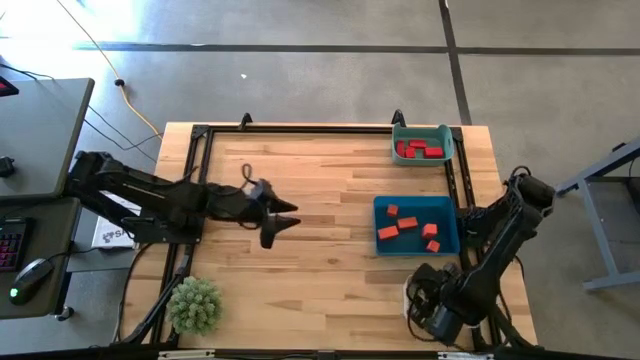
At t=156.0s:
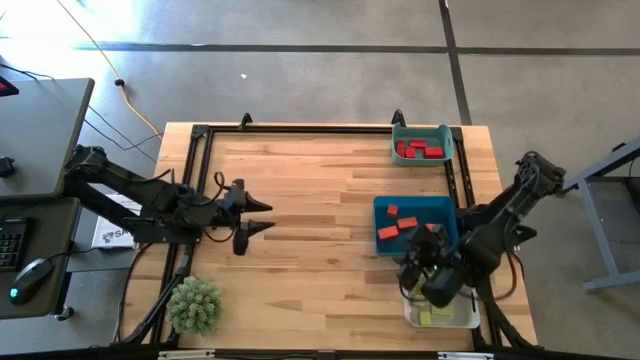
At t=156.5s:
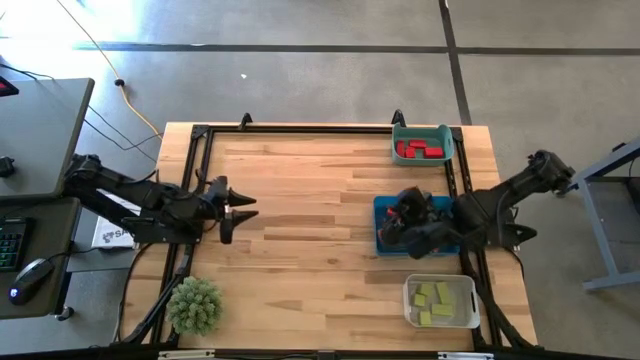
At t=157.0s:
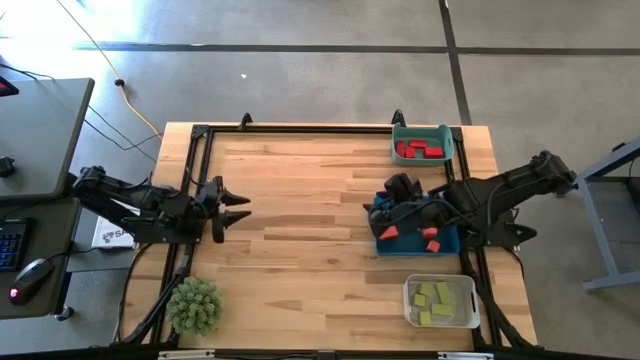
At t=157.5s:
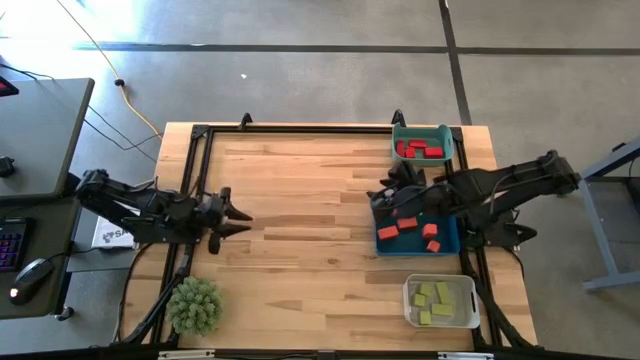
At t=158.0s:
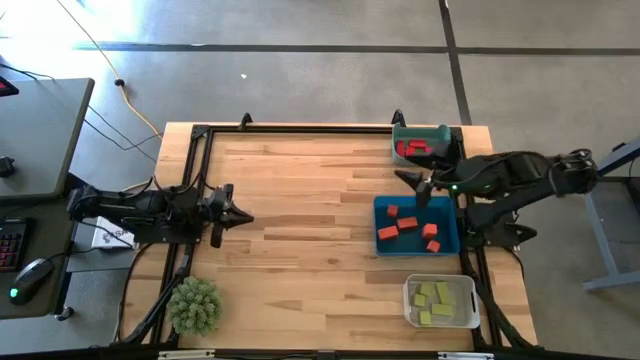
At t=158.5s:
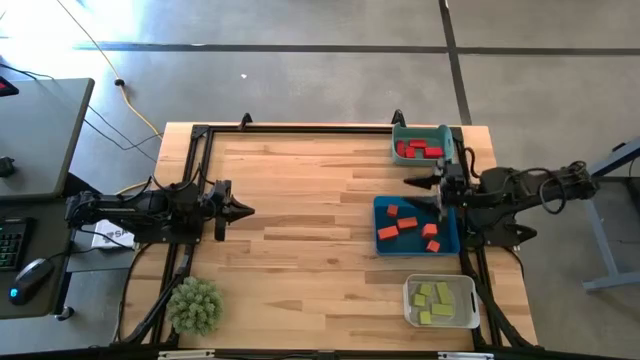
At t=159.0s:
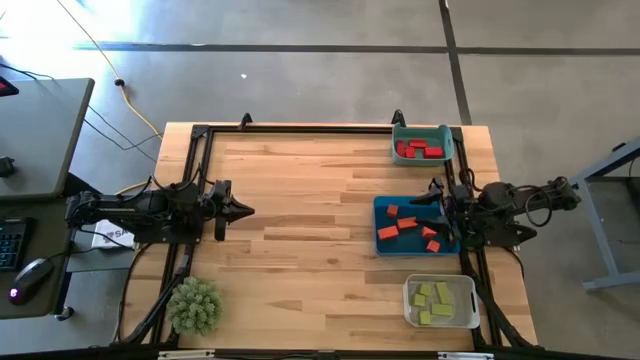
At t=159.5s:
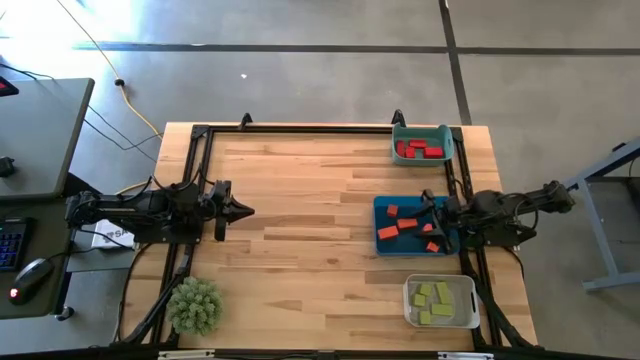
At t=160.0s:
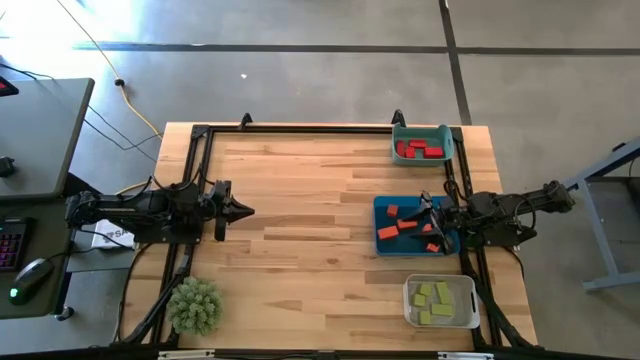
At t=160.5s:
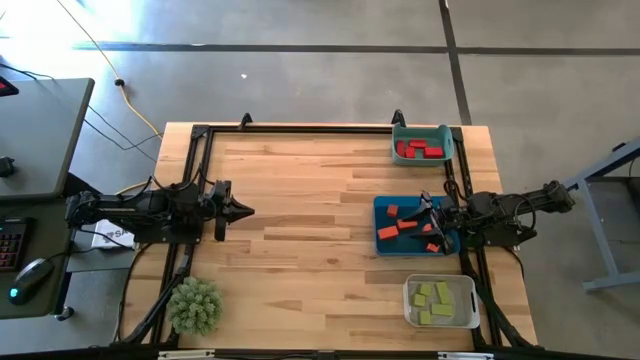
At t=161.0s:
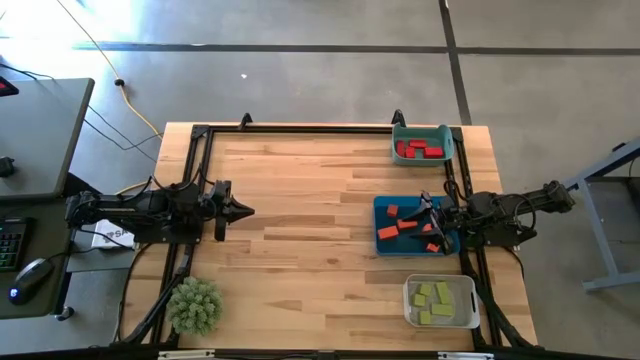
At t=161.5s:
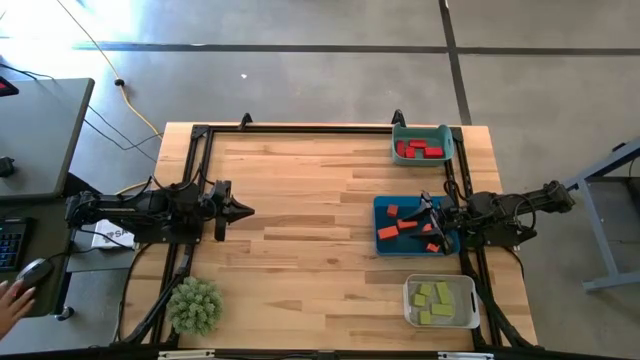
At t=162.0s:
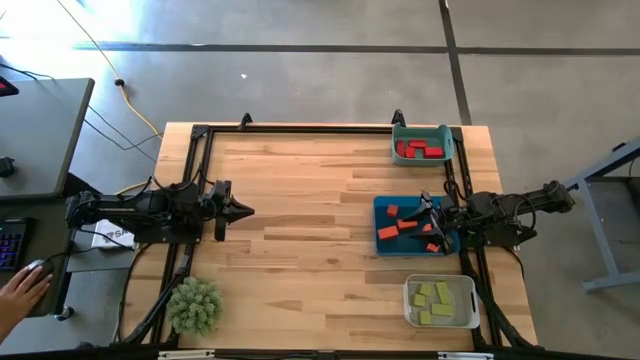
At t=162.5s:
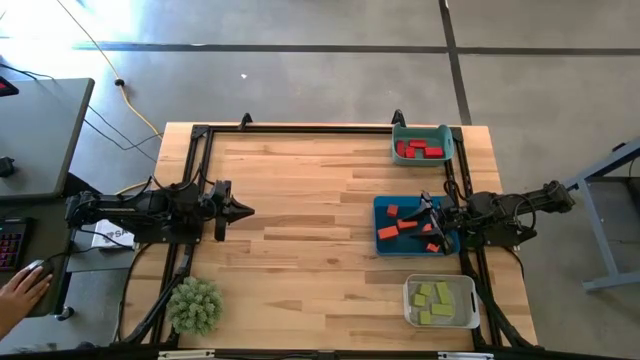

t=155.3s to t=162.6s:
Task: Sort & place blocks by color
Return to Home Position

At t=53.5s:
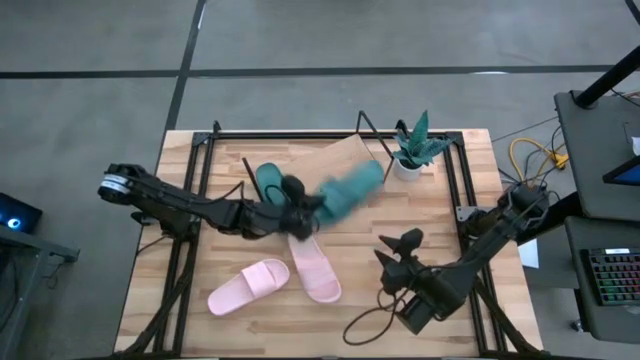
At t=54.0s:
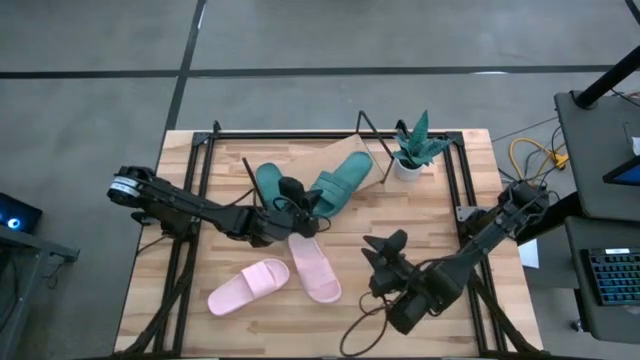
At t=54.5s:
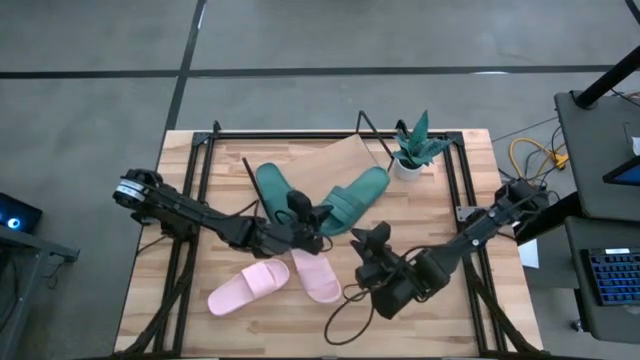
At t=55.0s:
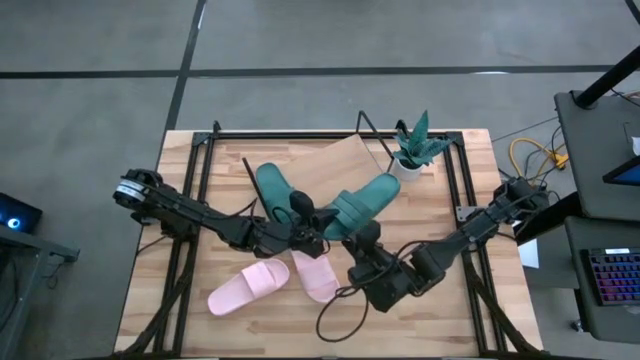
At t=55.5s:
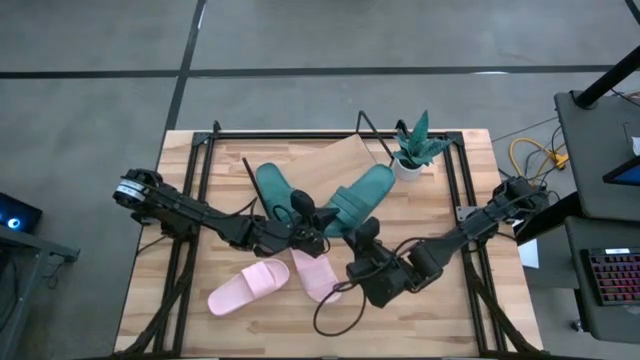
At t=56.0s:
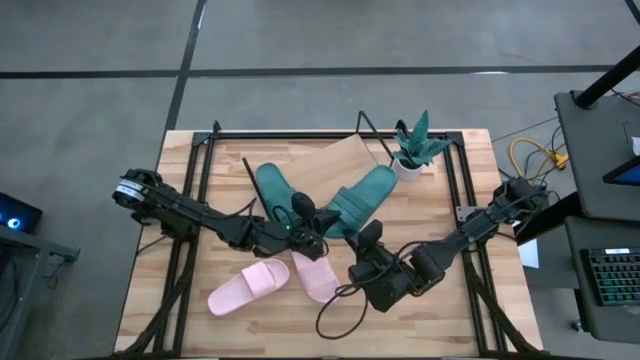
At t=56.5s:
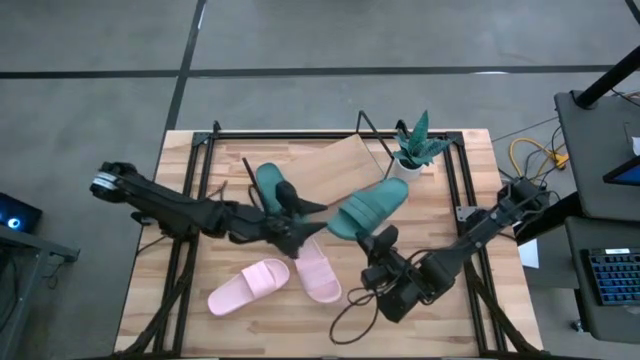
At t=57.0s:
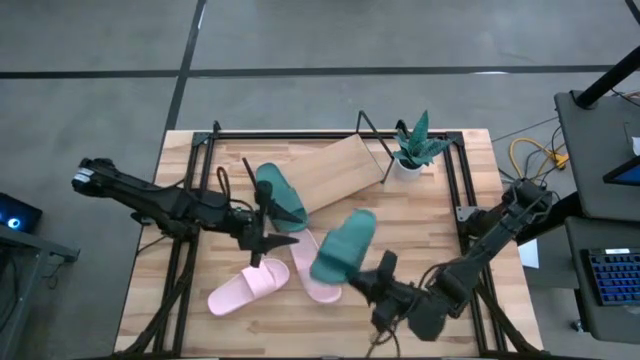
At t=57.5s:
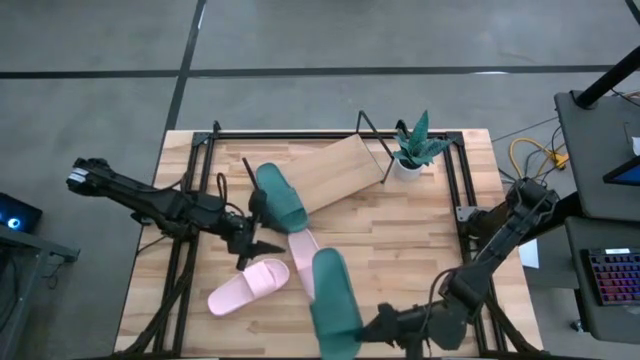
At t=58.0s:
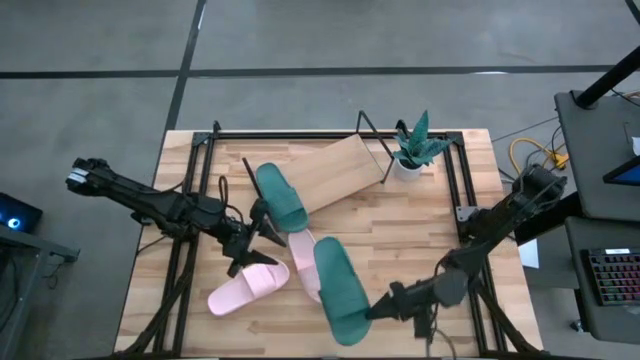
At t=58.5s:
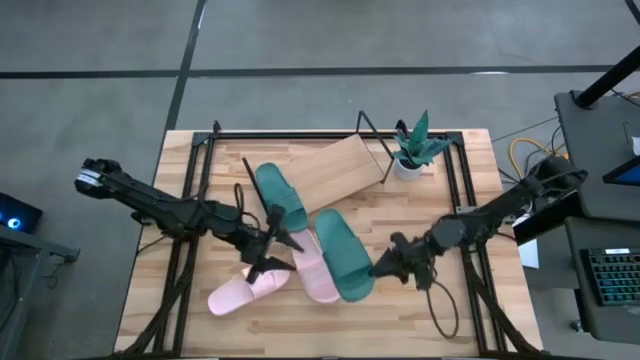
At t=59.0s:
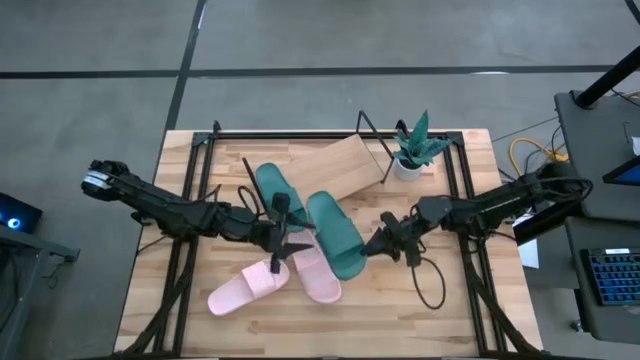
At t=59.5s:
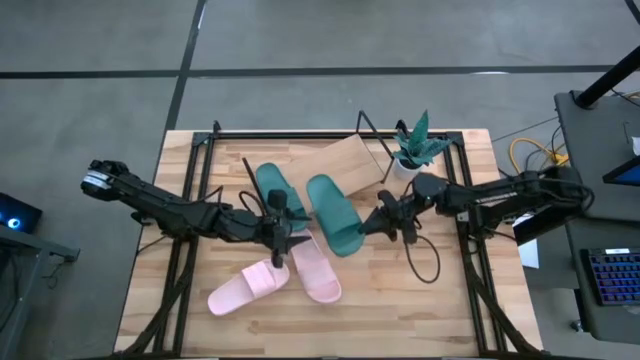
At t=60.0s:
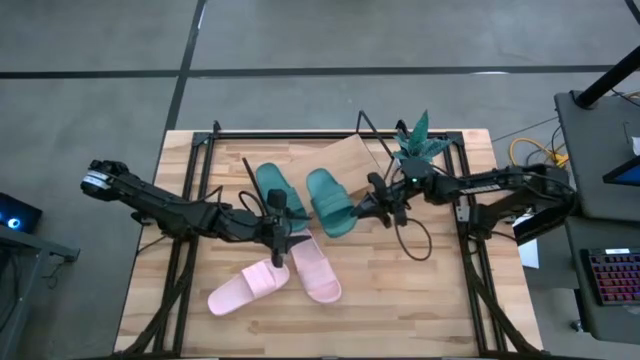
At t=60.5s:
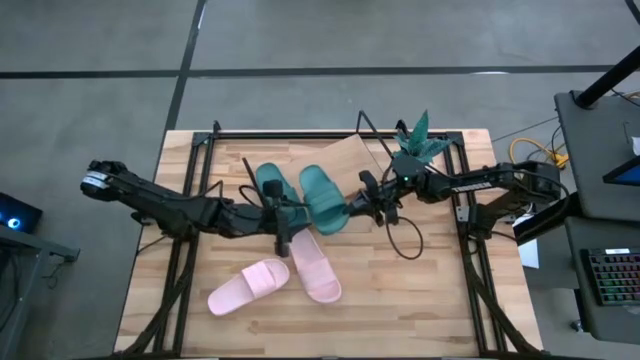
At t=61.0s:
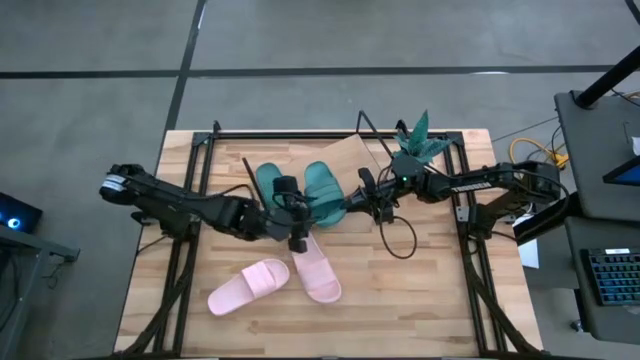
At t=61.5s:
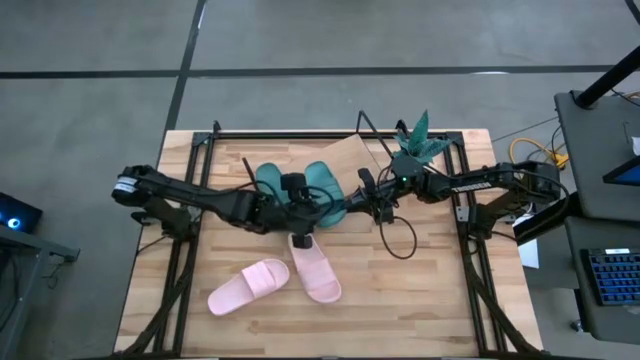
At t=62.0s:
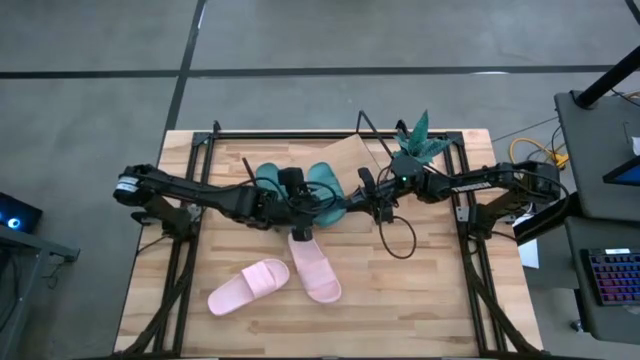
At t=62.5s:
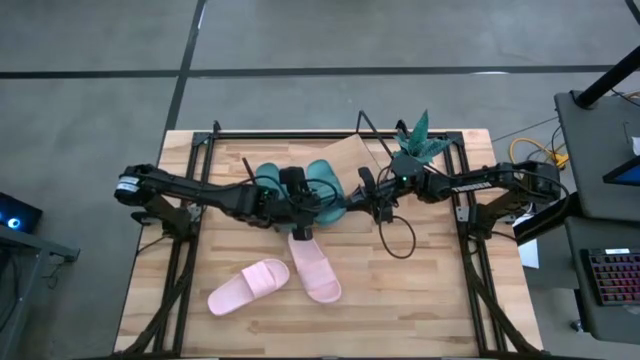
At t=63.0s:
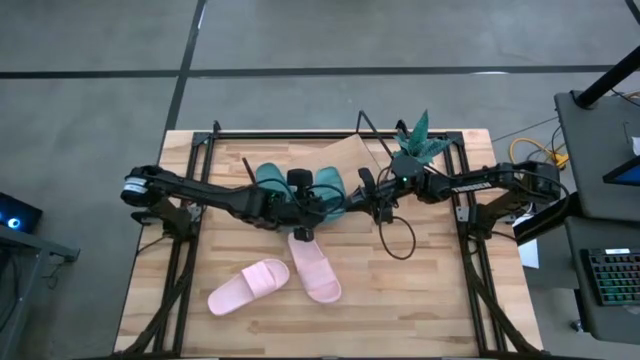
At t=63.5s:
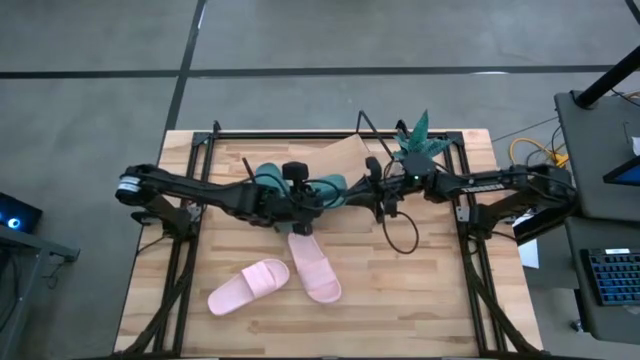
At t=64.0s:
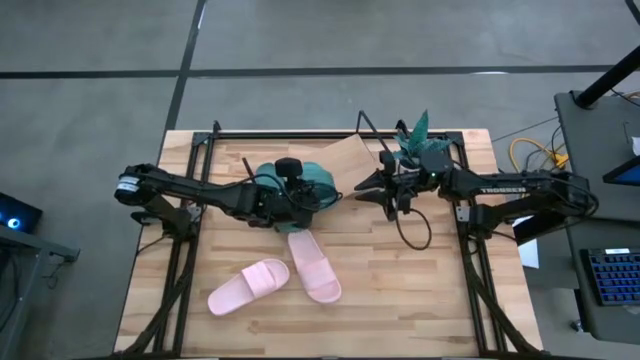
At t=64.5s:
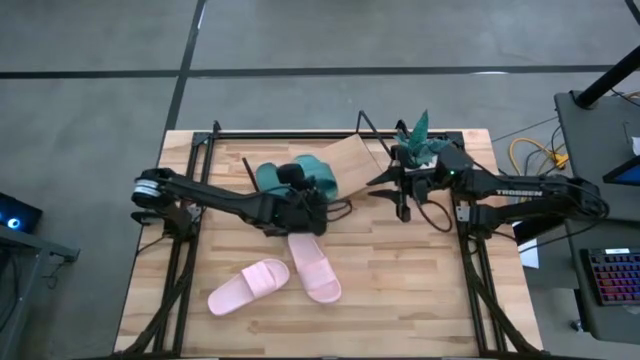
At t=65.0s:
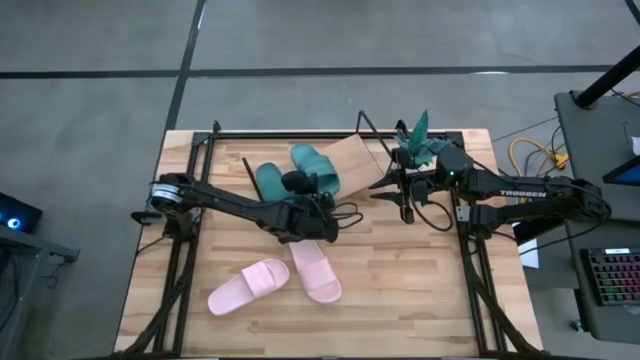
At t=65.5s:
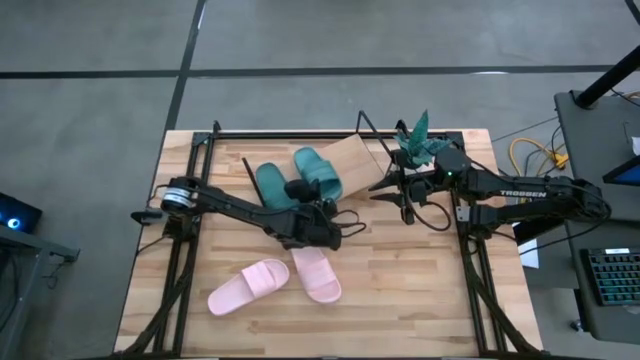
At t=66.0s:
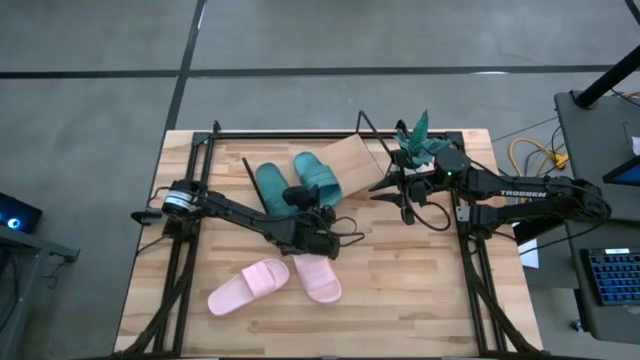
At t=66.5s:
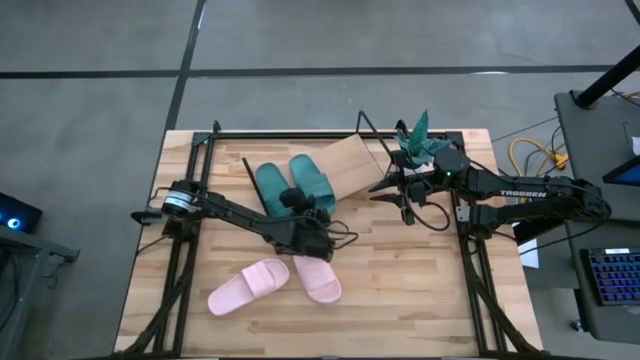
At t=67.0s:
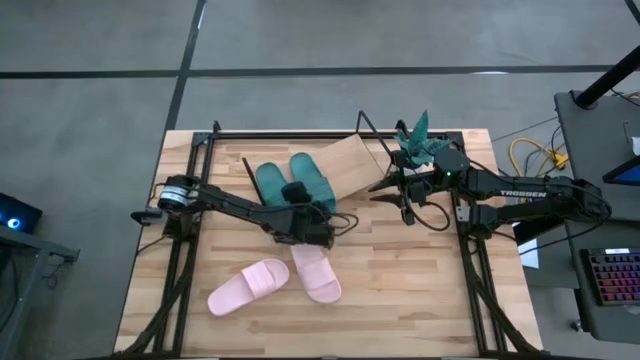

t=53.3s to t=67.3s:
Task: Pick and place slides into the shelf
Put the green slide on the shelf
